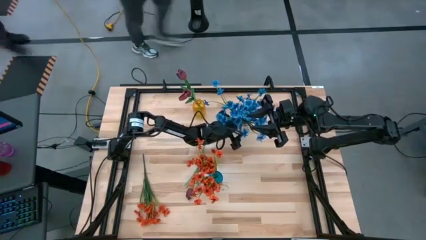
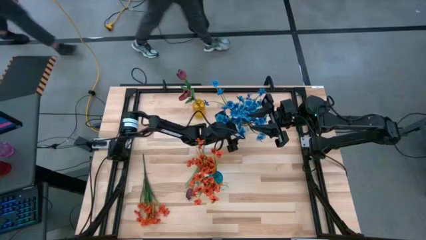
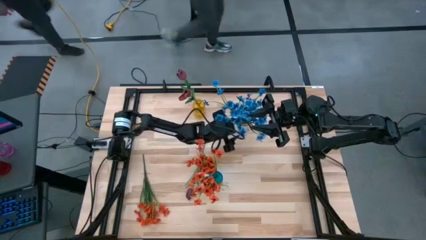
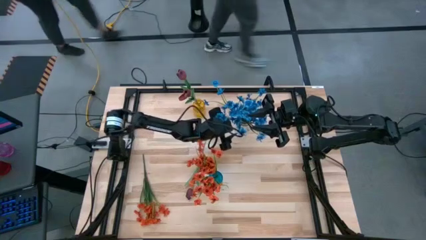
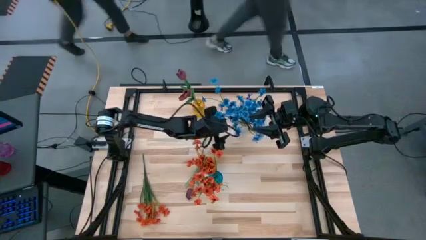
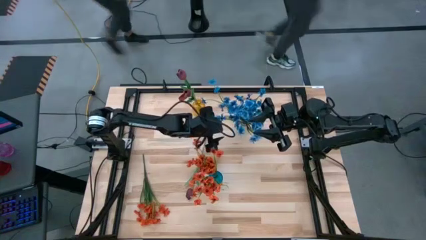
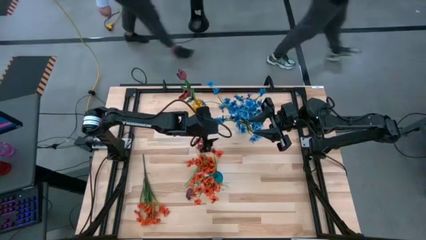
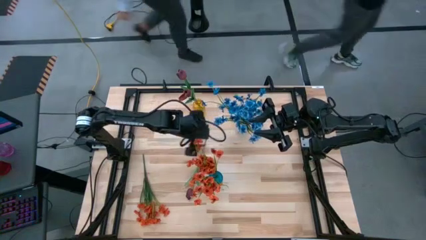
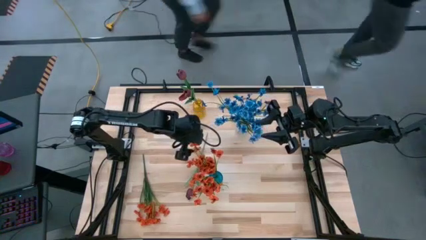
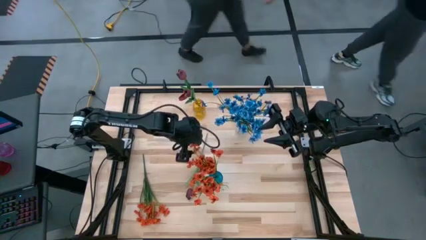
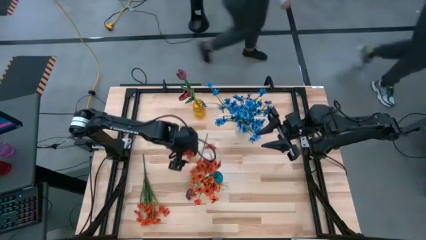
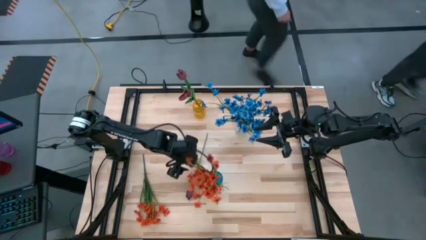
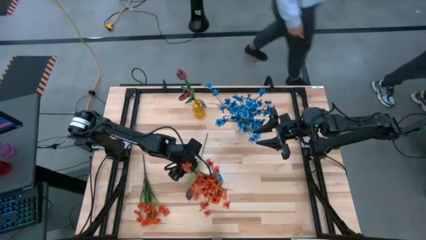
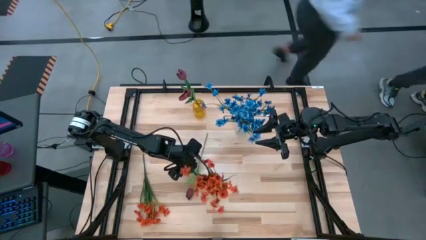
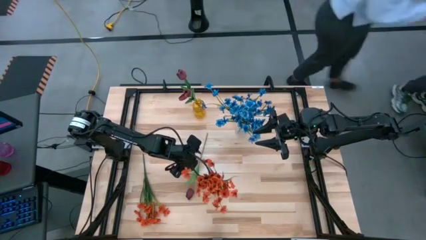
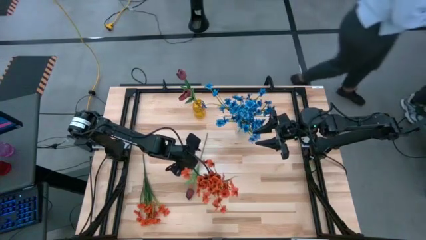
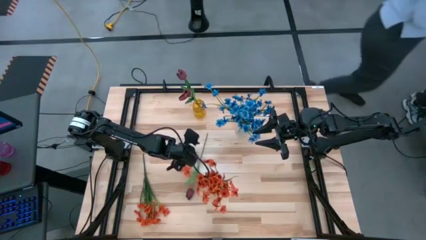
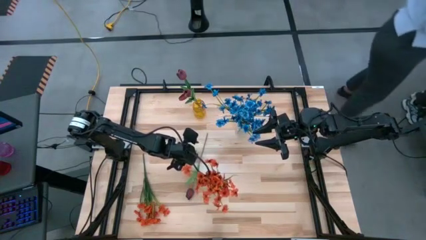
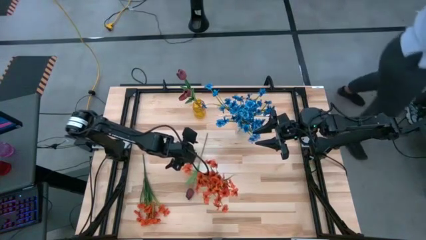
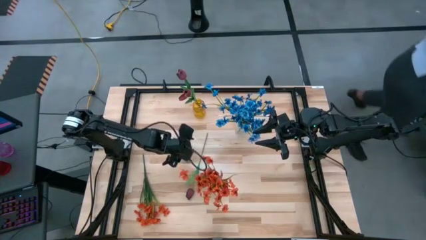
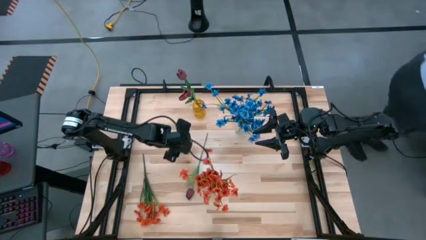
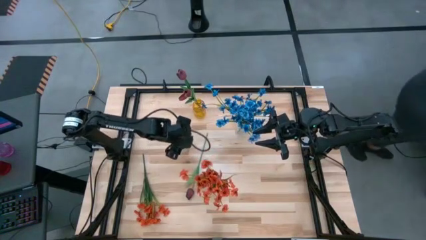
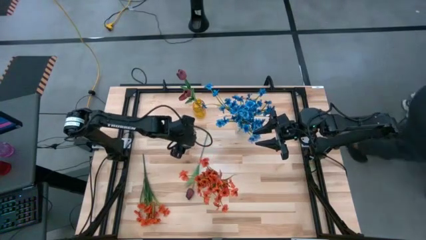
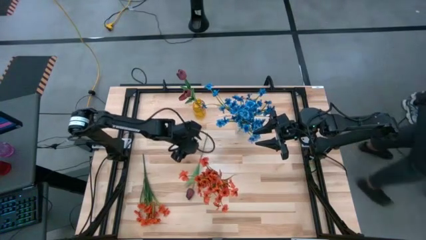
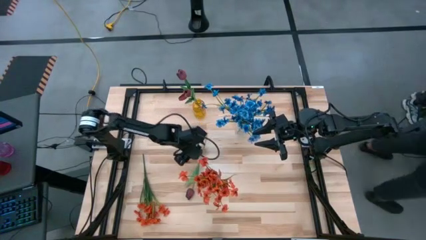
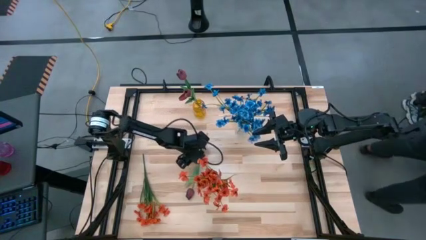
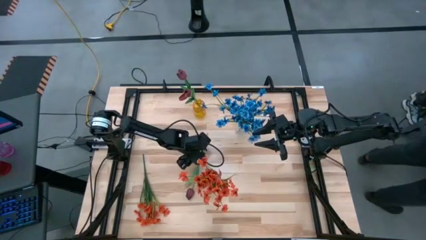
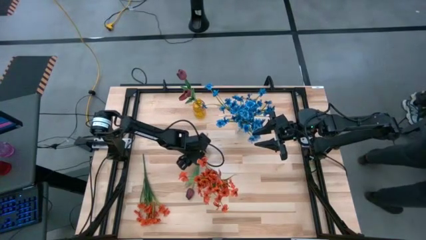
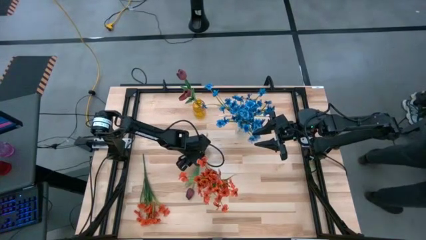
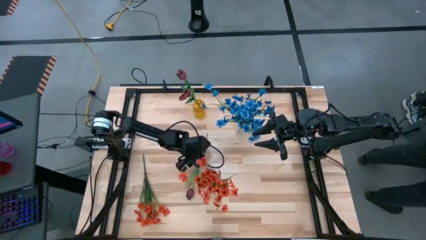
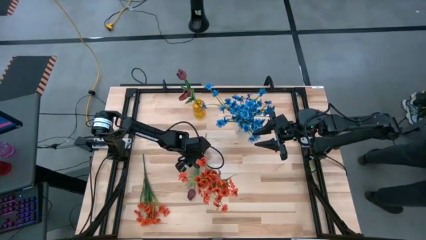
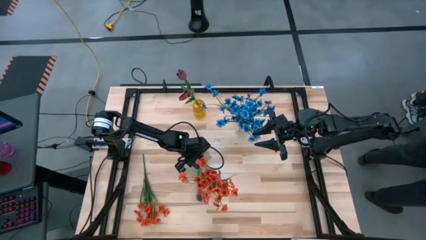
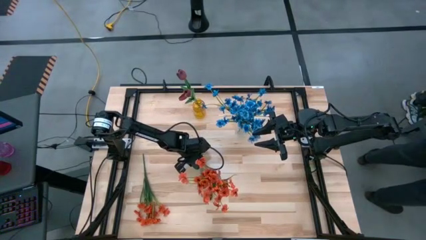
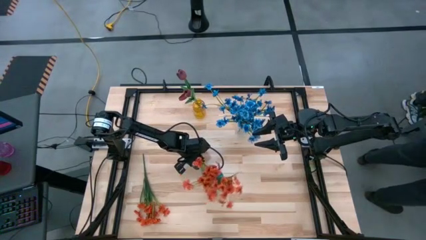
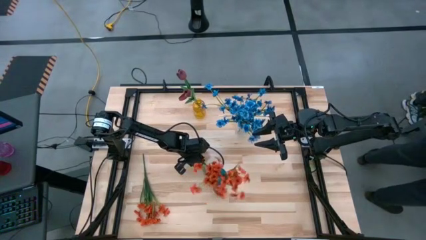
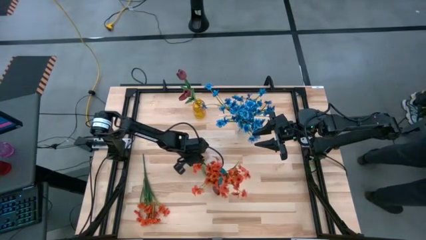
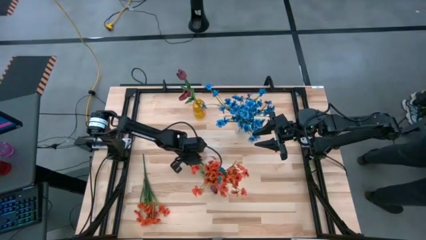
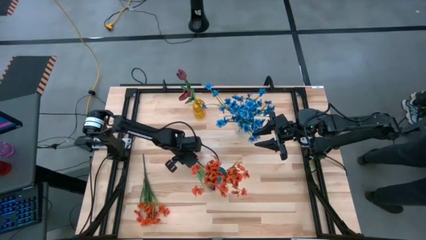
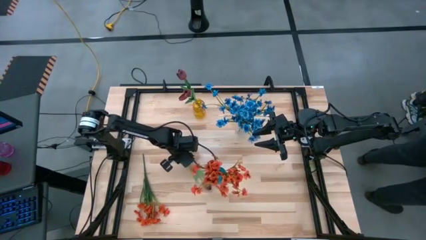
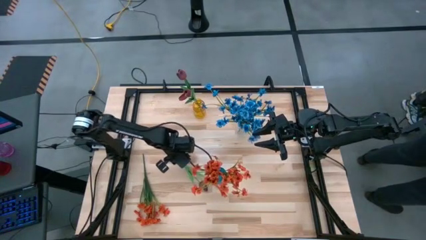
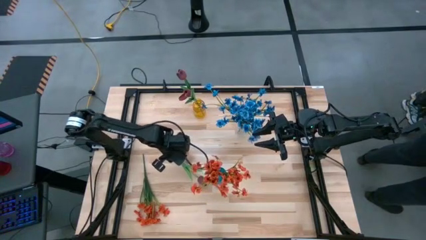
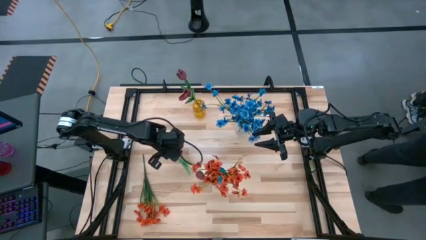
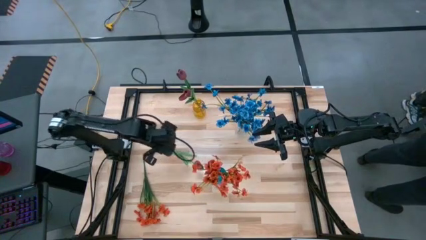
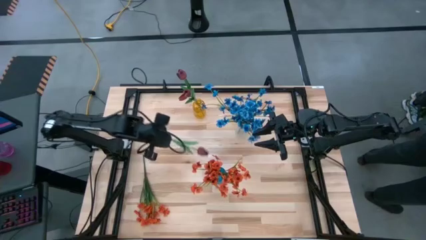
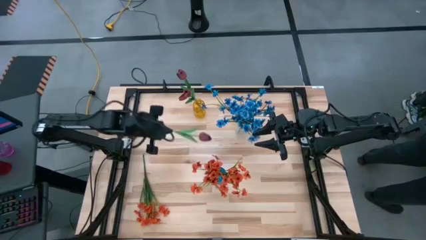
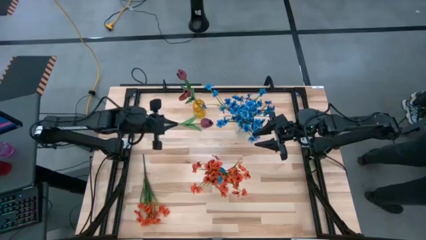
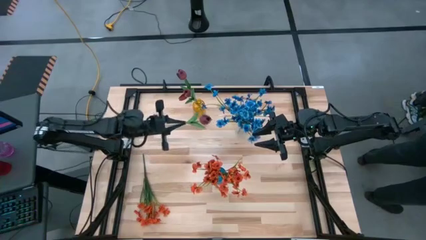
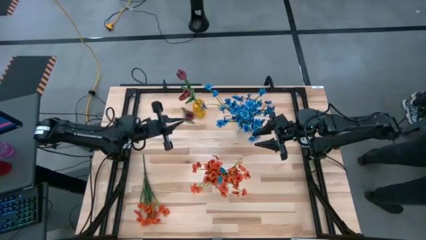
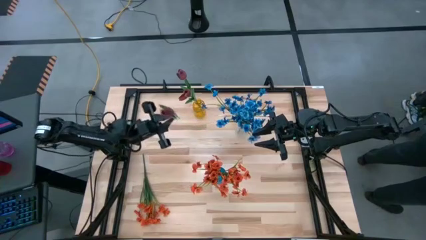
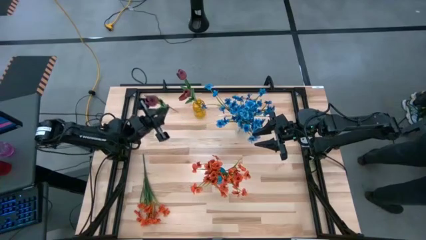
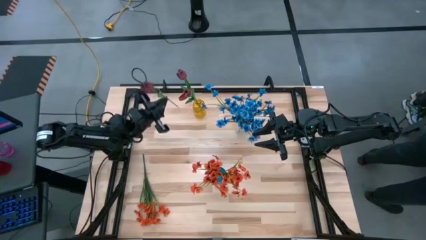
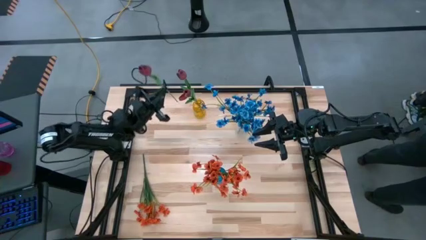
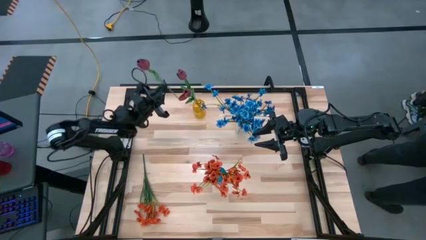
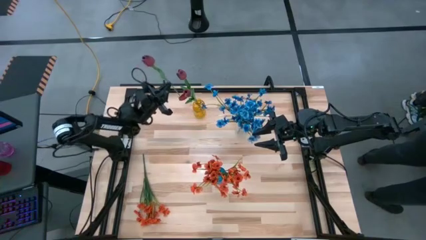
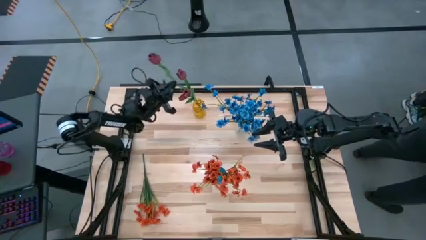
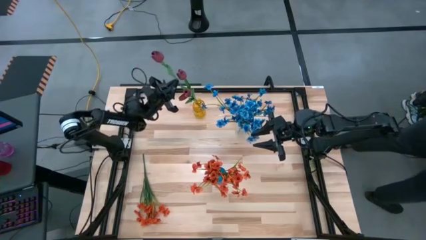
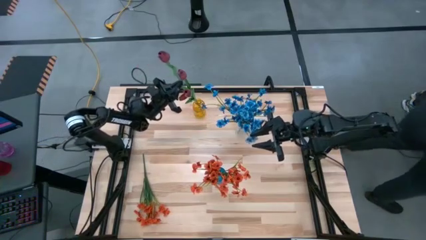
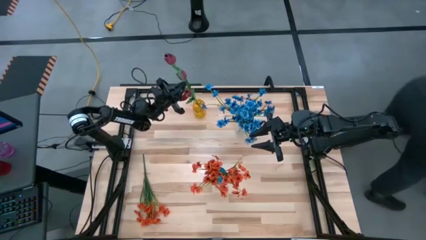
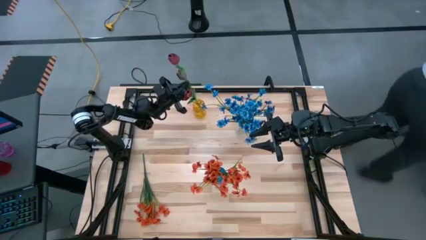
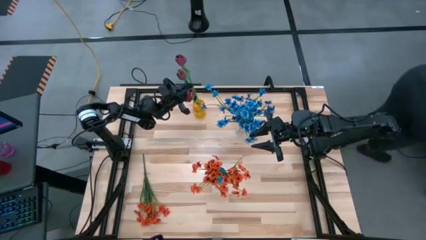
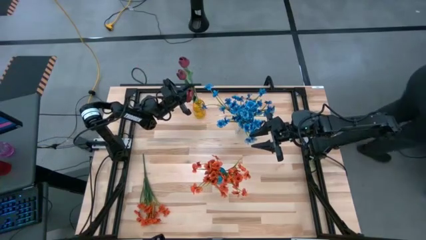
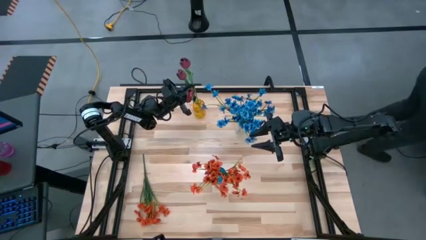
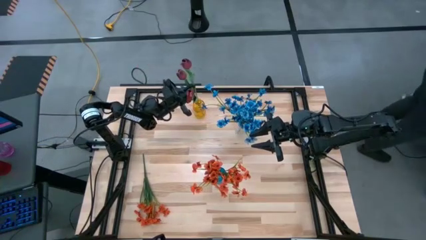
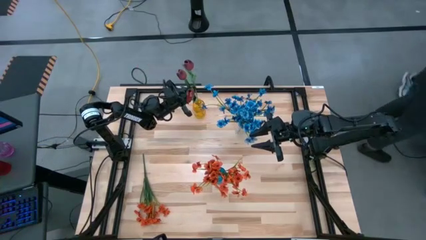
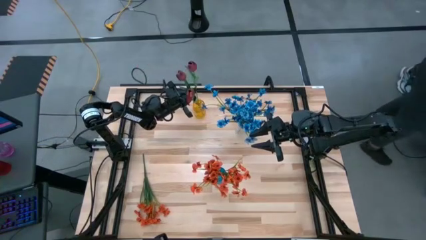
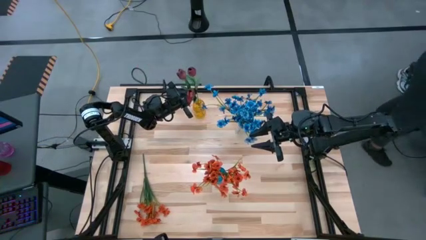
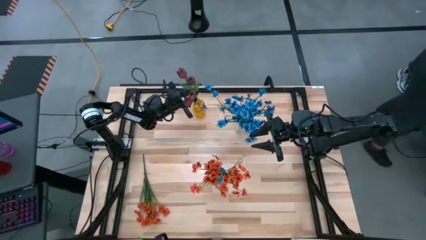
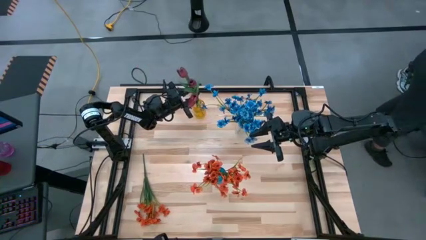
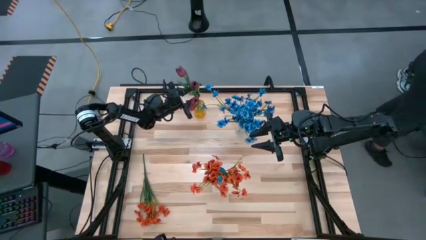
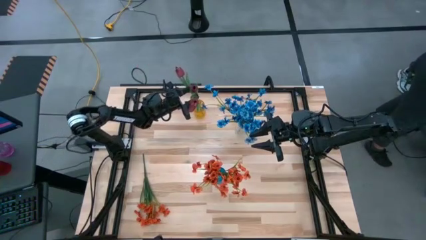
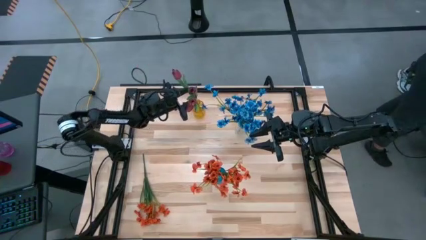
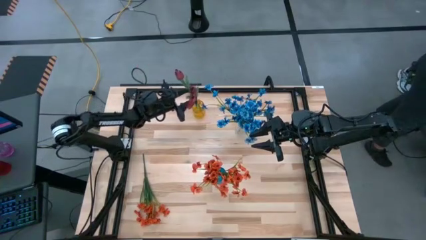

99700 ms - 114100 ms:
Task: Sort flowers into vase by color
Put the red flower into the yellow vase

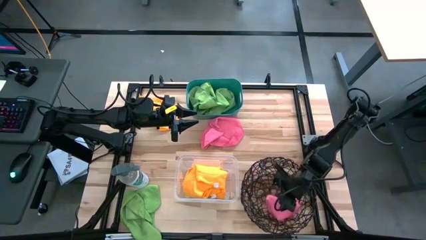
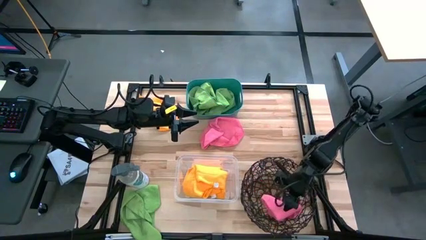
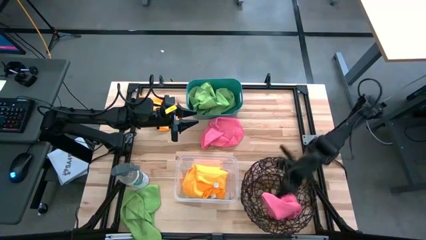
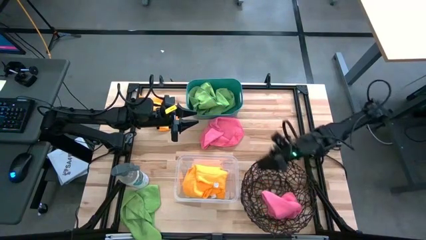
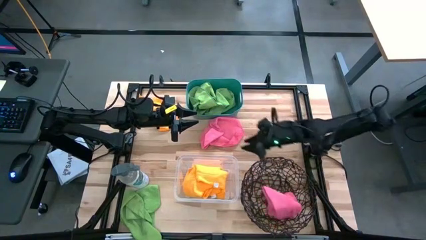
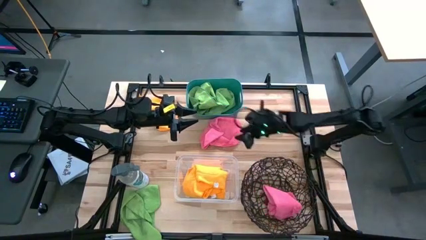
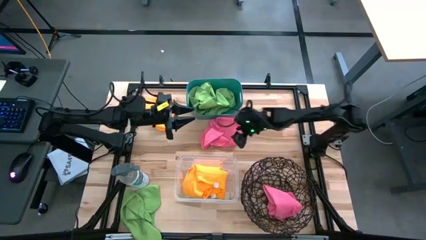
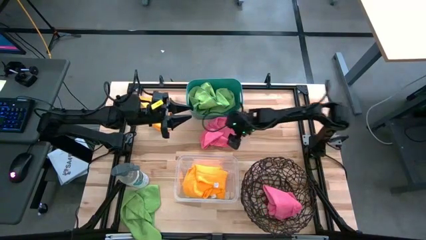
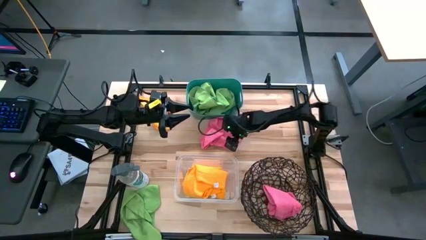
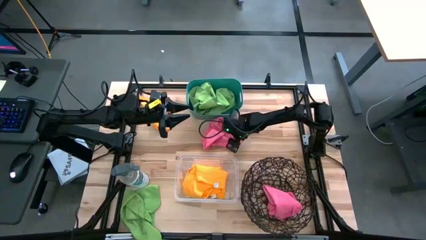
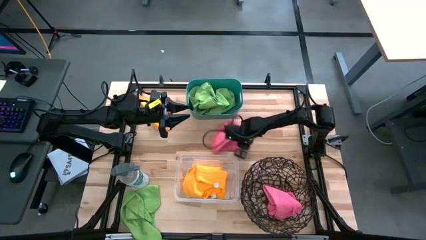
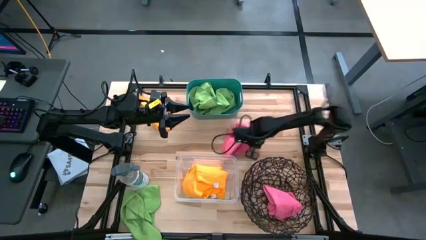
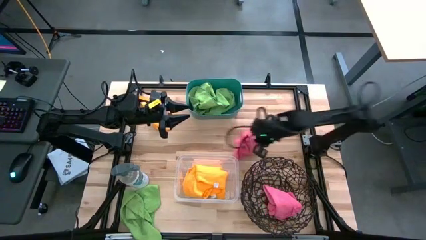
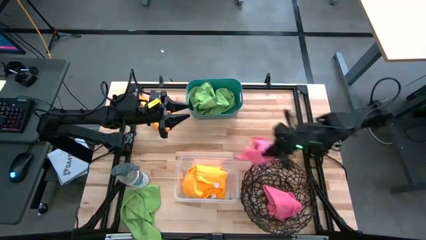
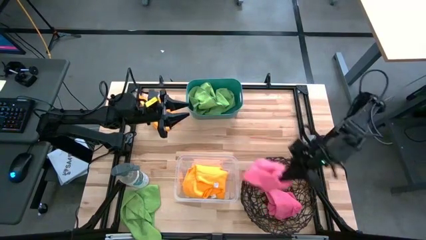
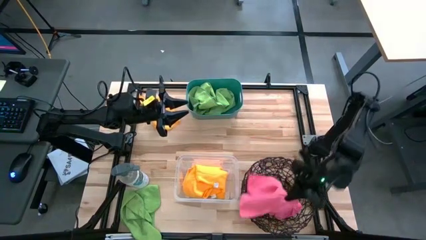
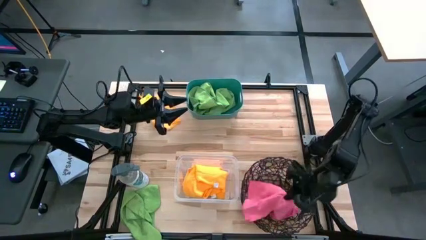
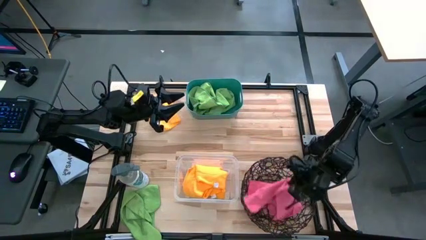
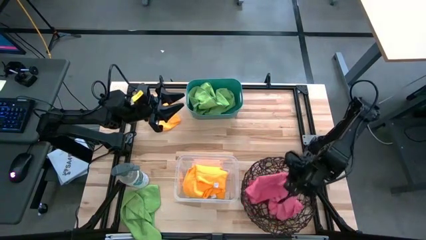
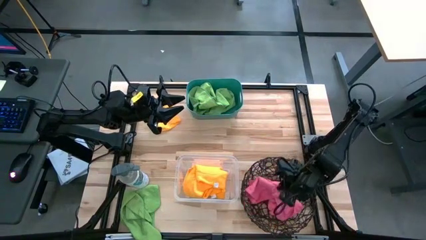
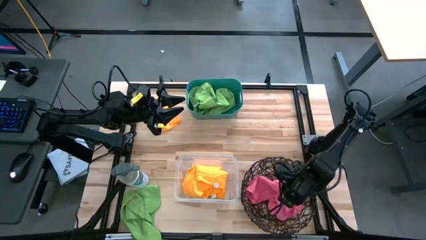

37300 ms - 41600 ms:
Task: Sort microfiber towel by color & place in baskets
Put the pink microfiber cloth into the basket
